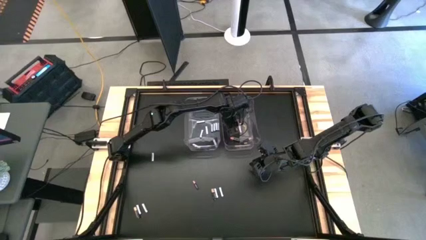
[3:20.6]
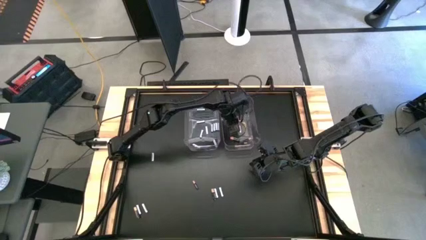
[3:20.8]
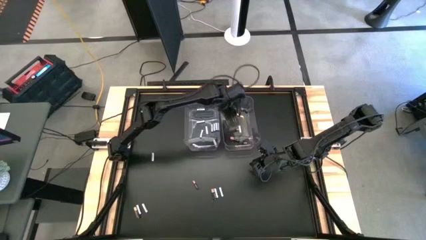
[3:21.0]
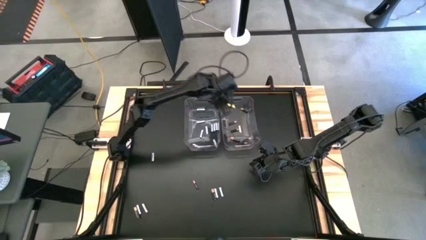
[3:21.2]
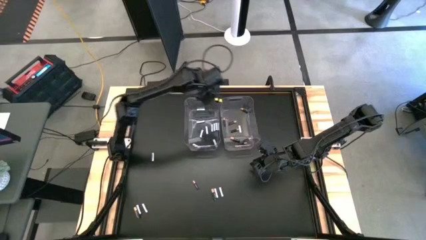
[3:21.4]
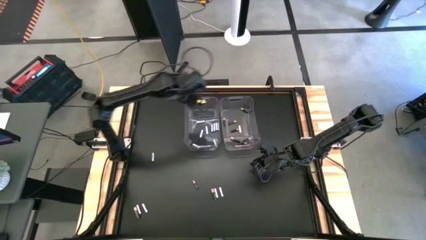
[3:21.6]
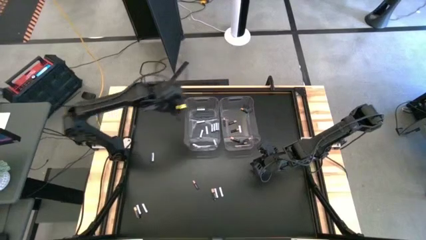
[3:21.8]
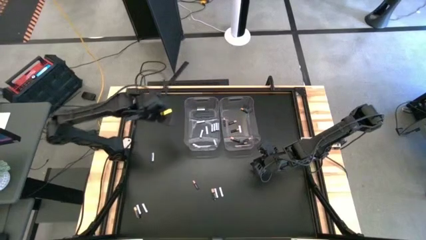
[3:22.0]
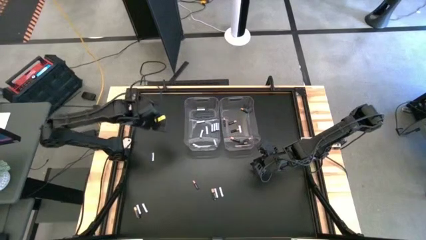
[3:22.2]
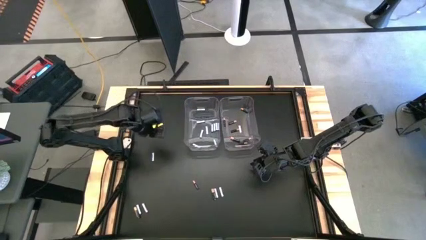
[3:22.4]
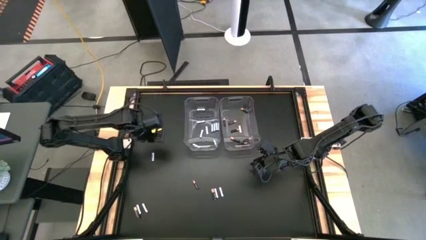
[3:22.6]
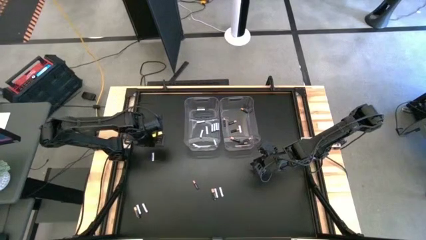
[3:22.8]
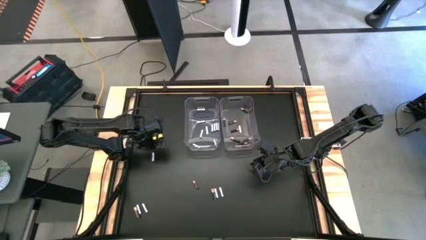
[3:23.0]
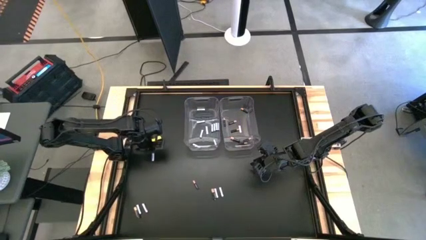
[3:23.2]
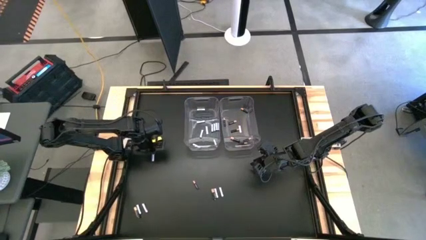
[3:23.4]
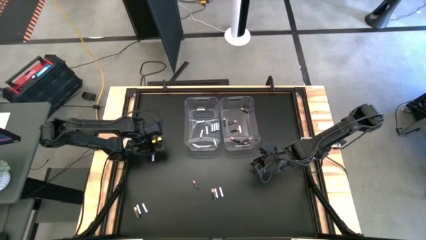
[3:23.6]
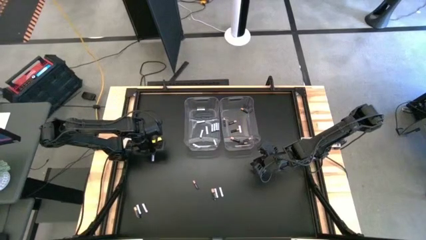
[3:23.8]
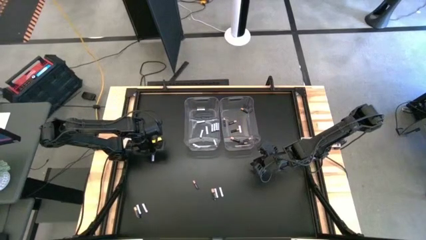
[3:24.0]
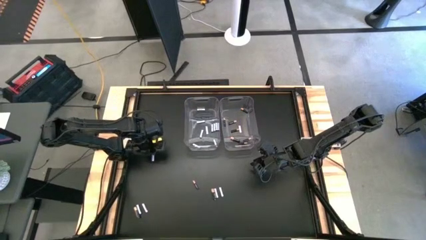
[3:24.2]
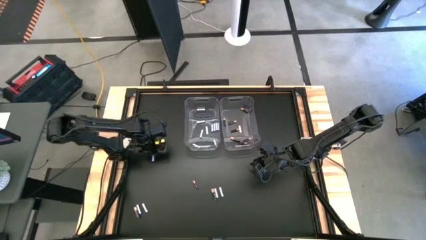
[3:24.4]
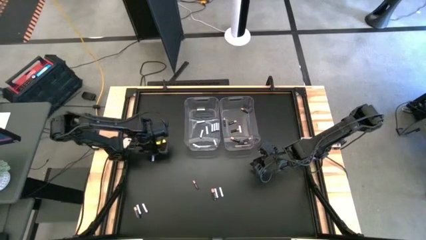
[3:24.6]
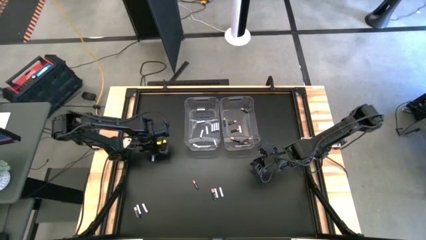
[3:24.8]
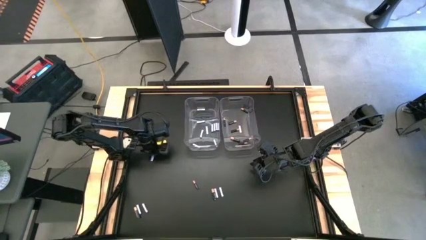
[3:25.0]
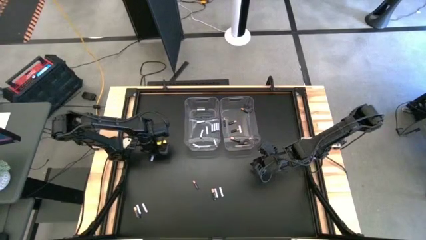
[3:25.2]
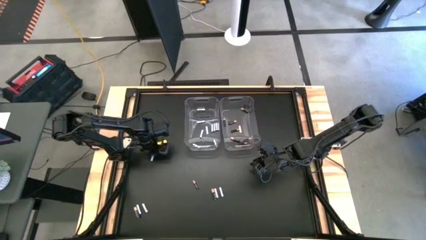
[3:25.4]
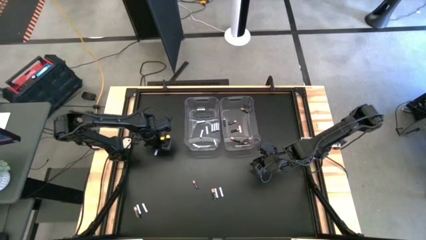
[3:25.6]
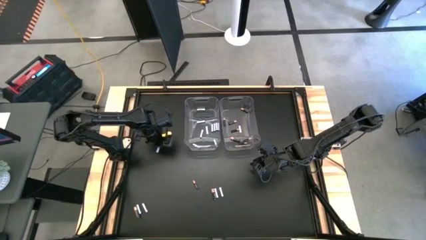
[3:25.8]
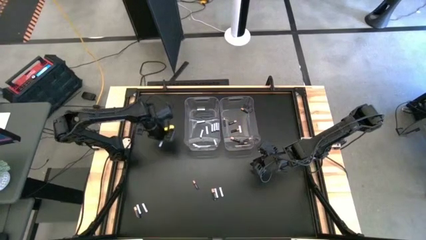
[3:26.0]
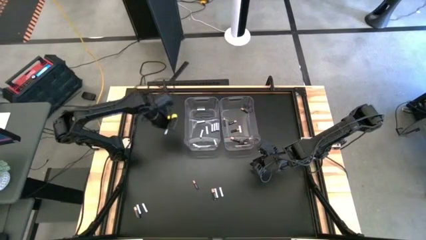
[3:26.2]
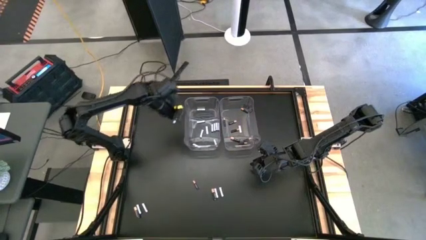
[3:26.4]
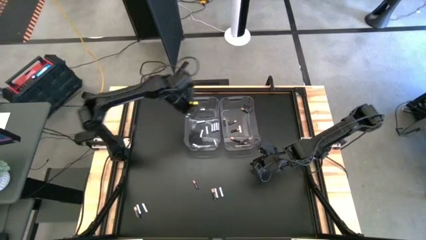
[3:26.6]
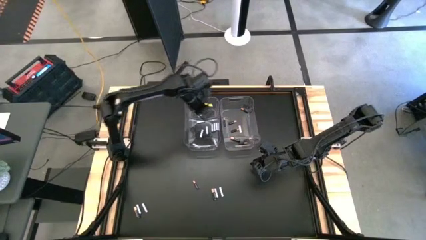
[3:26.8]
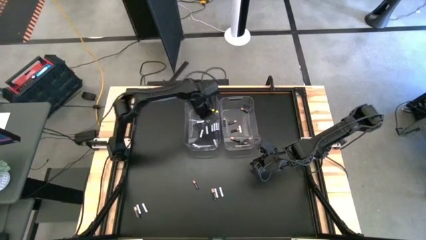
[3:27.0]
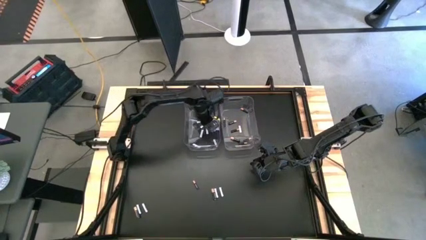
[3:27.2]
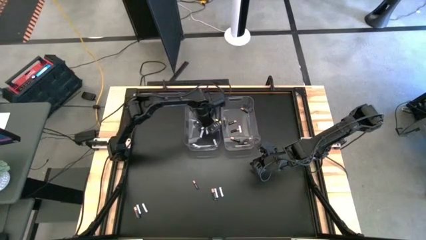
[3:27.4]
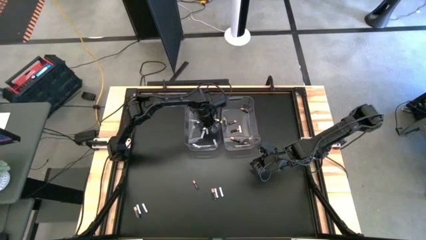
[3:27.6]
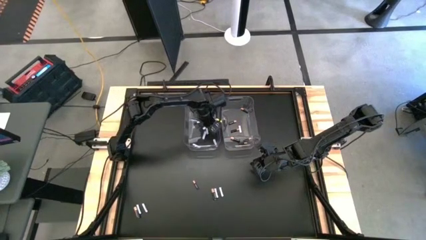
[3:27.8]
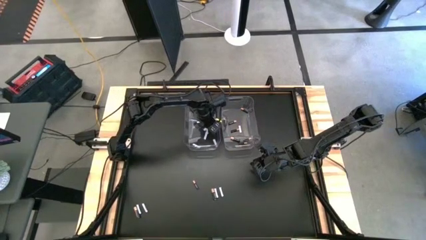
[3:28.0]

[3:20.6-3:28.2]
Task: Sort batteries
Put the white battery into the left transparent bin

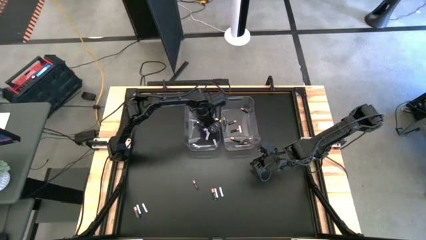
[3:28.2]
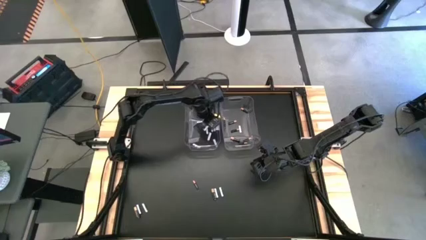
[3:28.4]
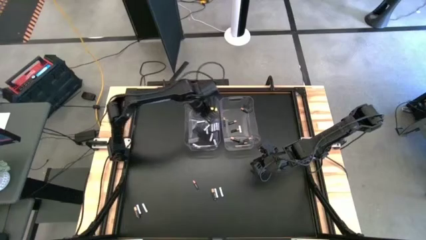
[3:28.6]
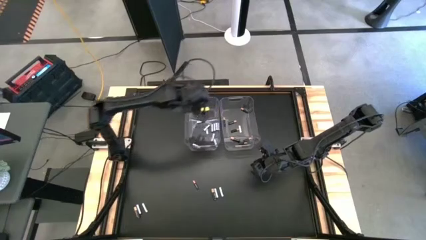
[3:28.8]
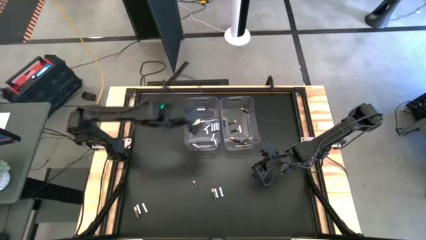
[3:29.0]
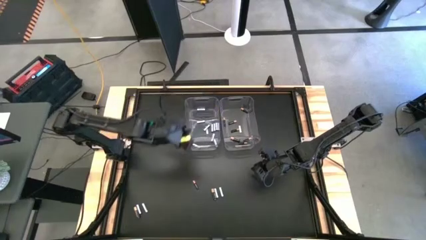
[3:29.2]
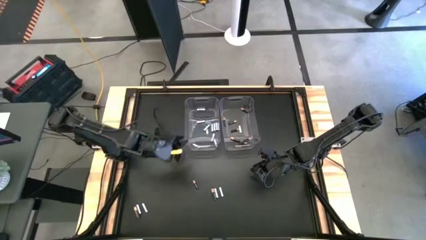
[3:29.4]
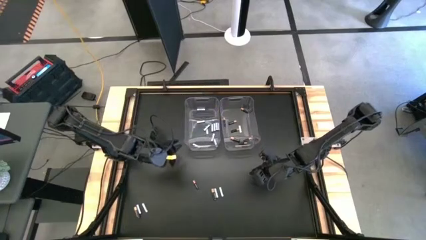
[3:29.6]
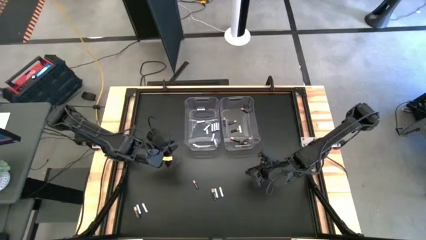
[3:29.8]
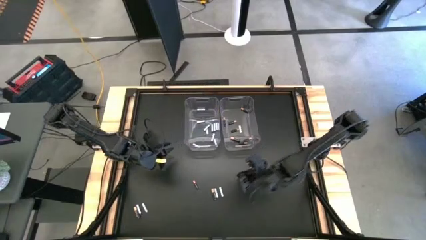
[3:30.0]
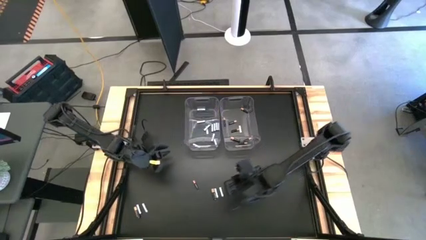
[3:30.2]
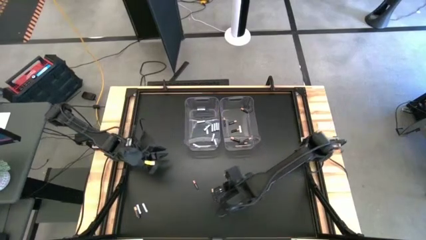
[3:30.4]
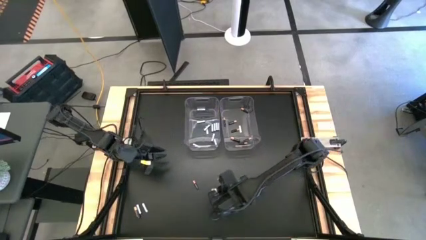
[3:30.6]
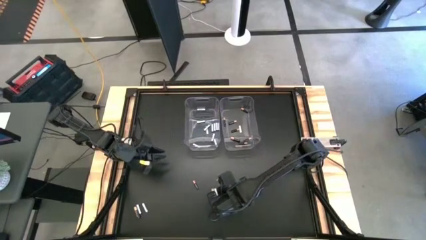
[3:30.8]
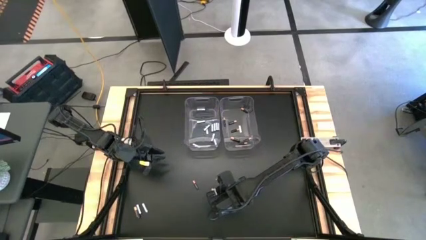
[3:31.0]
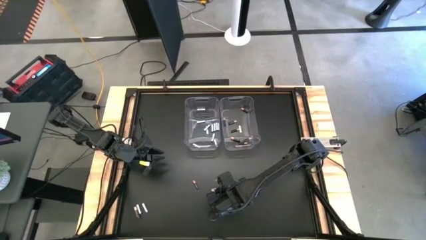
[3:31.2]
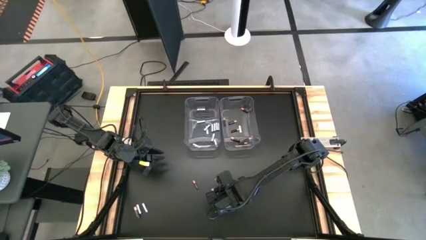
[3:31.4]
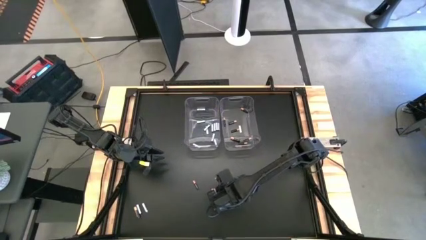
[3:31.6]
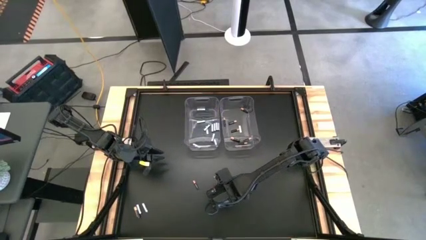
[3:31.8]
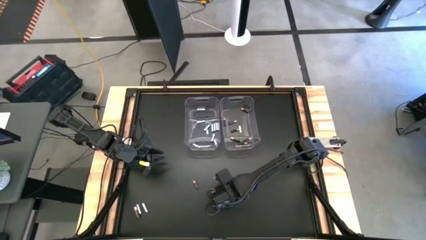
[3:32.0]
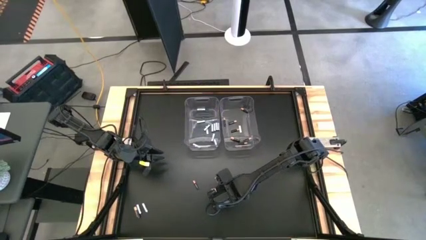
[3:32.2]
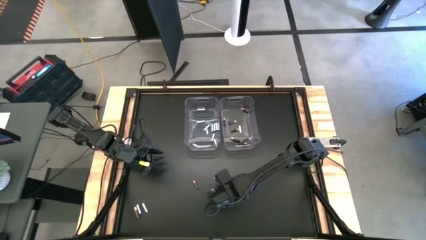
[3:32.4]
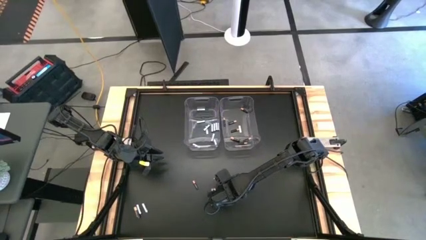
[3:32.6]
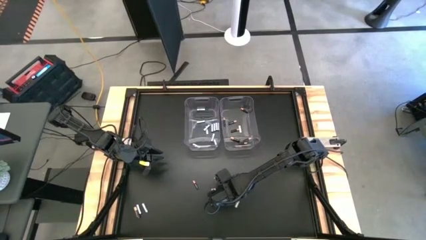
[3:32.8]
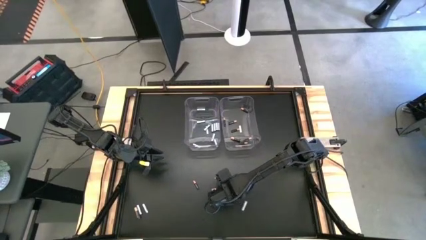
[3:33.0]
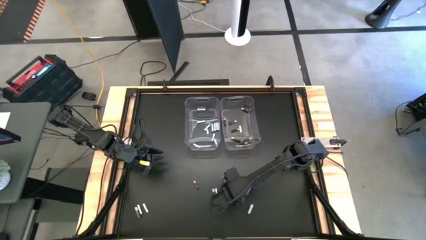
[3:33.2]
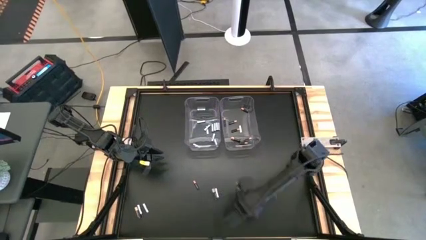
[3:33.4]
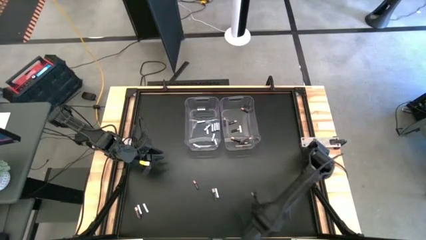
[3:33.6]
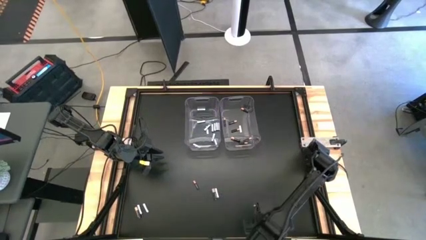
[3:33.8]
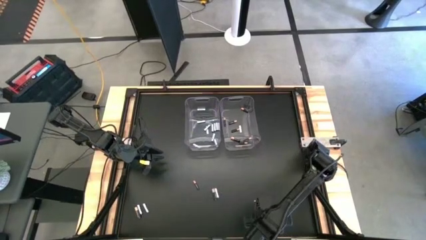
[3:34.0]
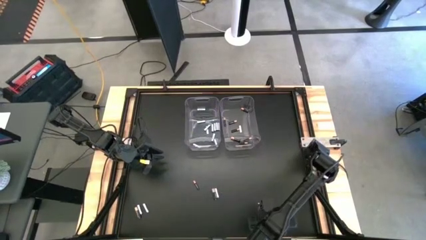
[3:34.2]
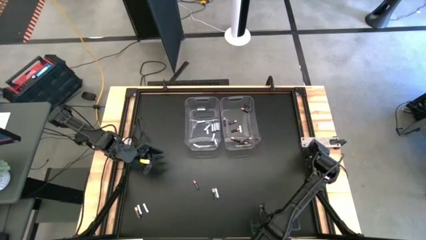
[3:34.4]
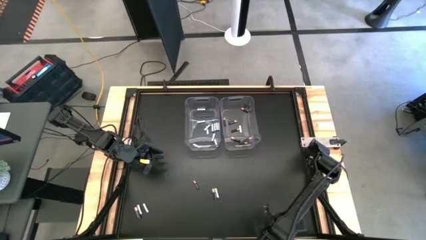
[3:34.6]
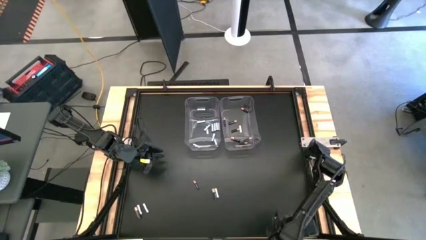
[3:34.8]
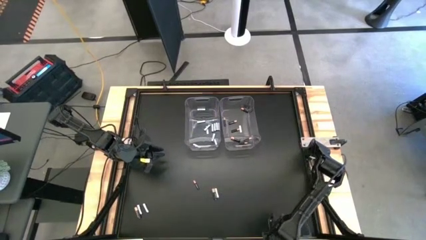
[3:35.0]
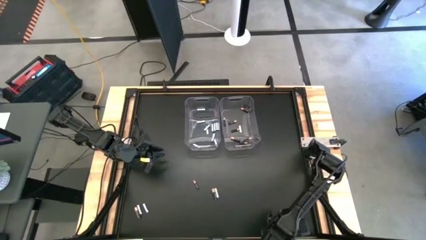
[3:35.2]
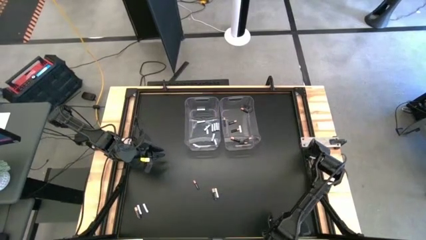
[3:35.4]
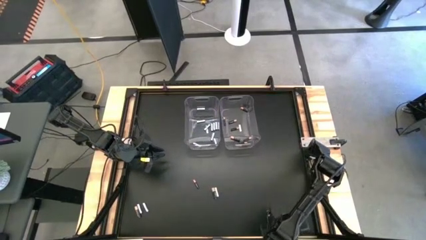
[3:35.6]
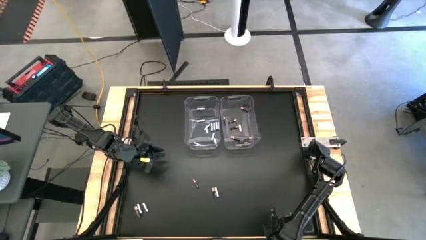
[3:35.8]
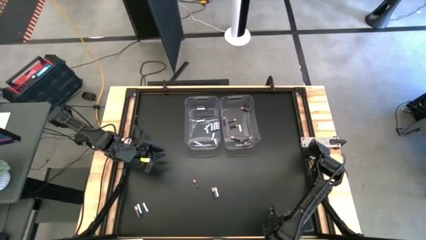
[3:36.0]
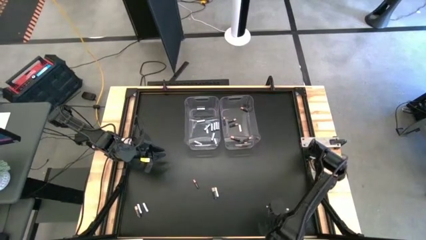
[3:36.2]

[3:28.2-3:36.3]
Put the white battery into the left transparent bin

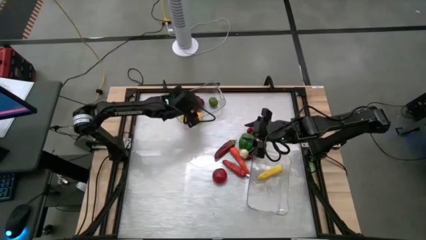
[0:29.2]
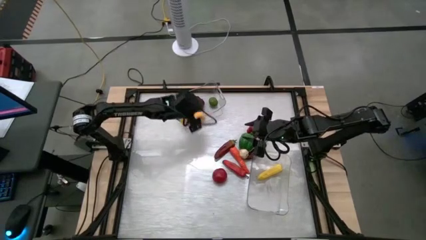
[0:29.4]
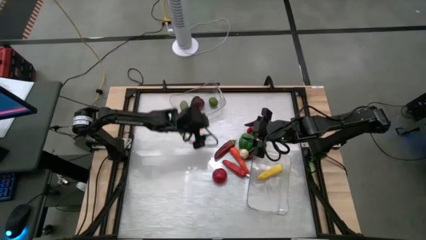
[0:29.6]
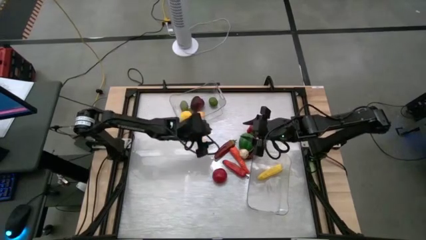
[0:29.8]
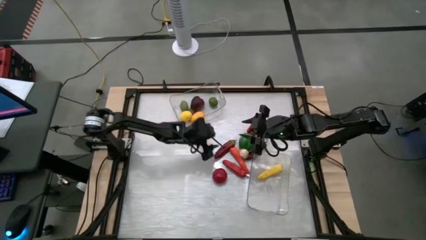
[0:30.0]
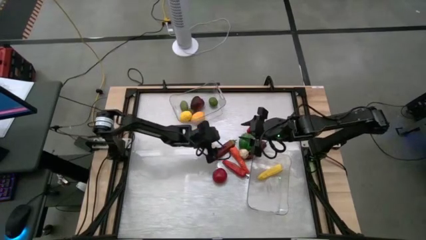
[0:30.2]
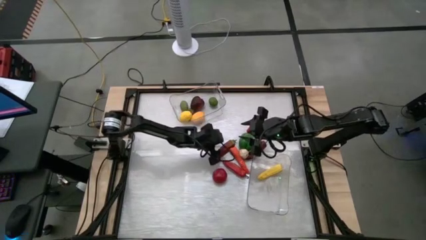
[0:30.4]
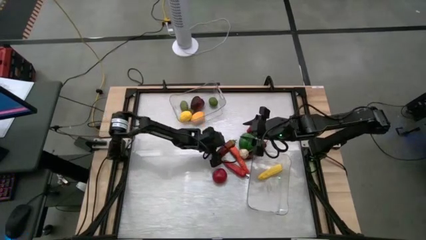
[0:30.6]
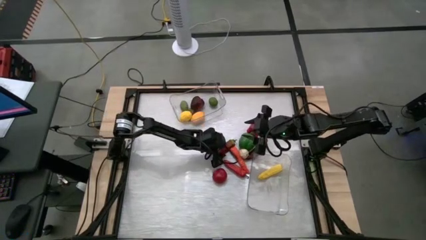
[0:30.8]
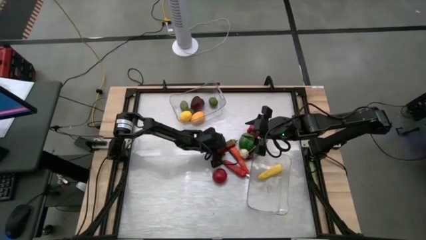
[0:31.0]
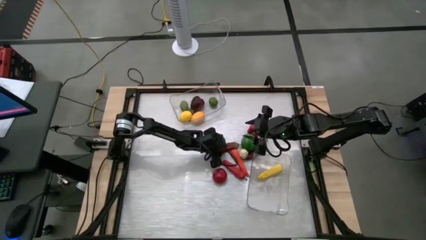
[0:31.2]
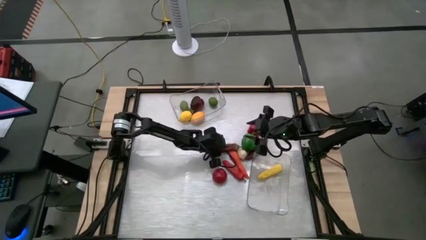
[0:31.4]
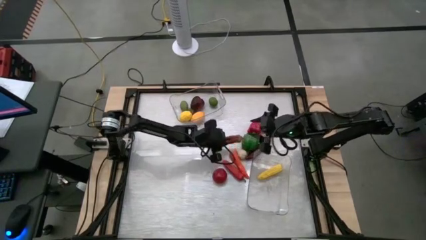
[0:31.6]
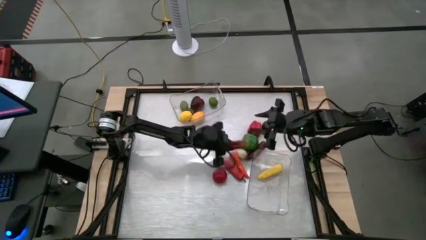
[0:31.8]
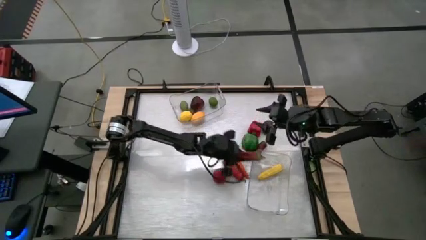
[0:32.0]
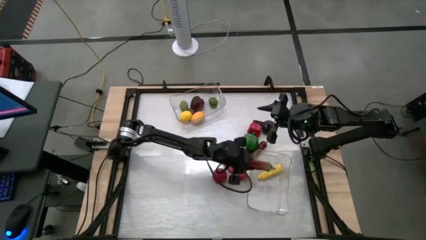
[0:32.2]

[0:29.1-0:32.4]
Task: Sort produce into baskets
Put the left dark red chili into the bottom transparent bin
